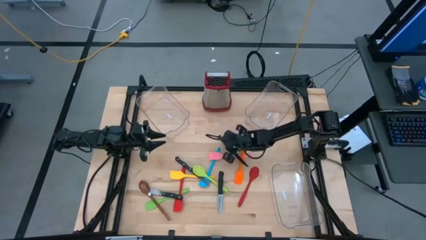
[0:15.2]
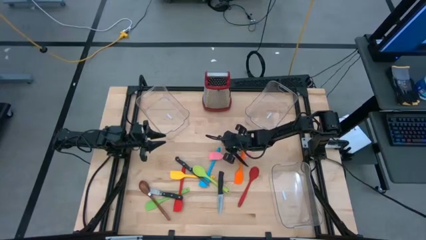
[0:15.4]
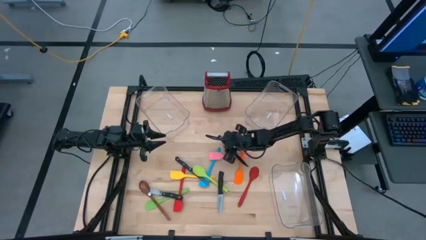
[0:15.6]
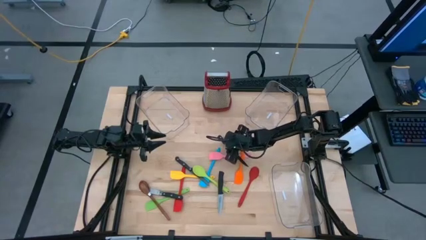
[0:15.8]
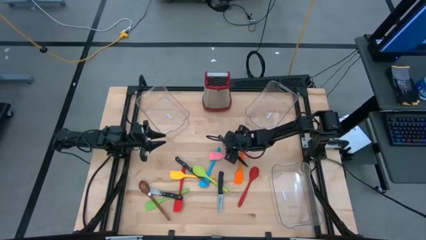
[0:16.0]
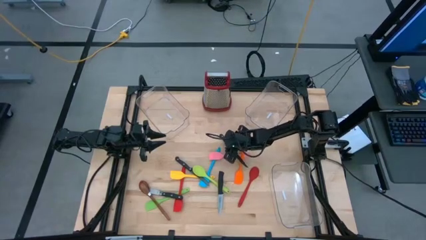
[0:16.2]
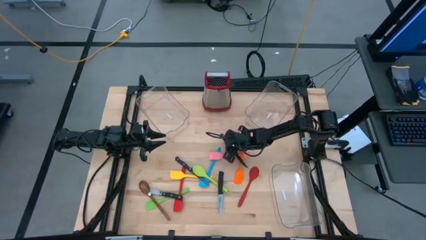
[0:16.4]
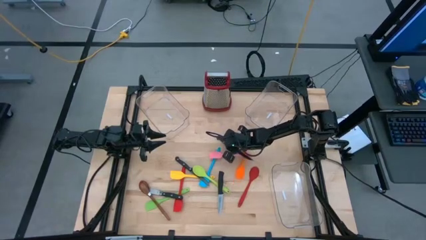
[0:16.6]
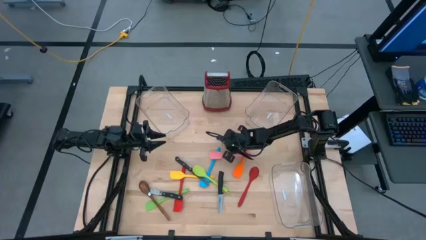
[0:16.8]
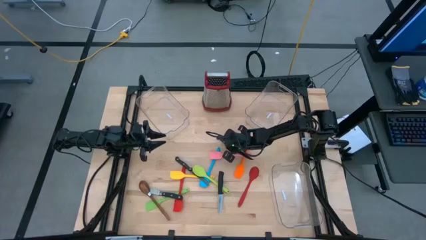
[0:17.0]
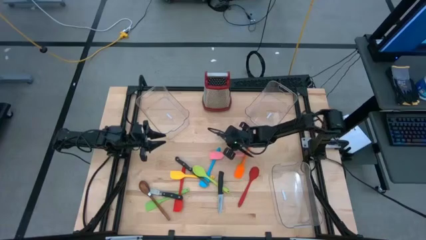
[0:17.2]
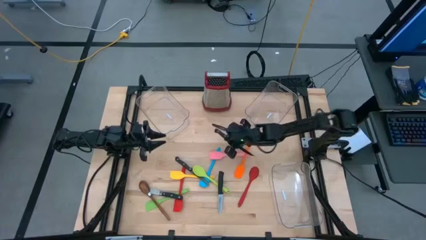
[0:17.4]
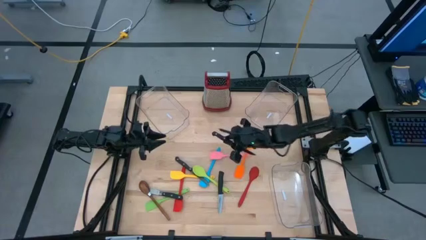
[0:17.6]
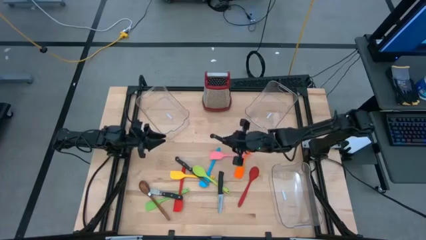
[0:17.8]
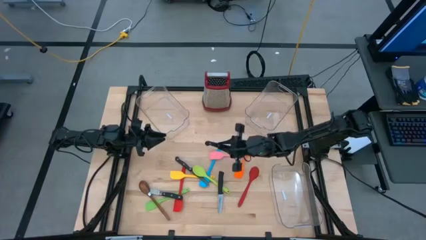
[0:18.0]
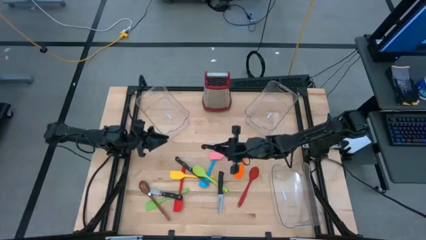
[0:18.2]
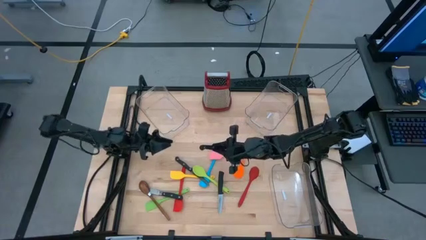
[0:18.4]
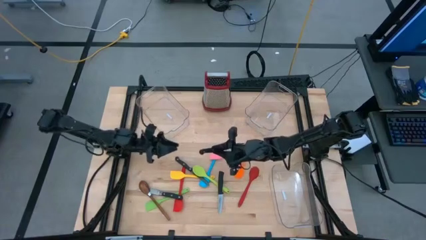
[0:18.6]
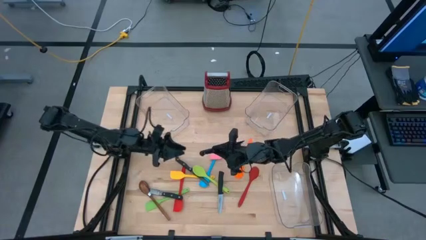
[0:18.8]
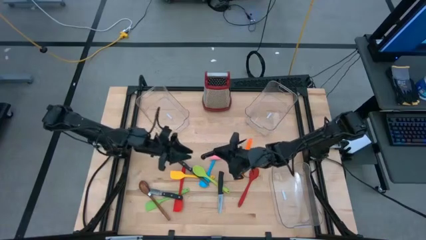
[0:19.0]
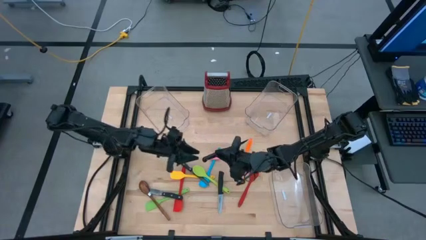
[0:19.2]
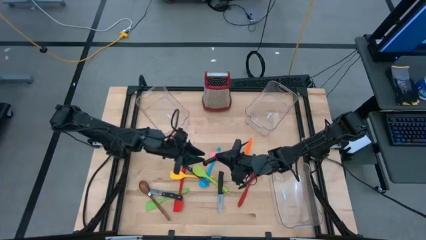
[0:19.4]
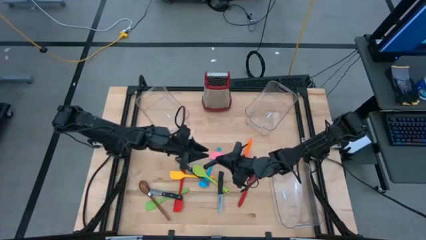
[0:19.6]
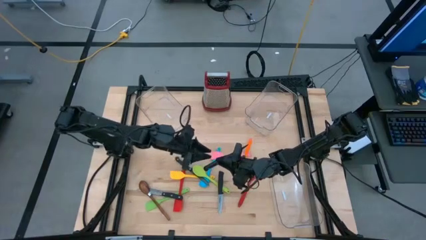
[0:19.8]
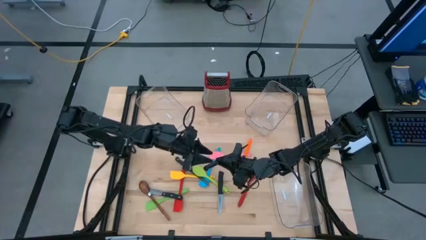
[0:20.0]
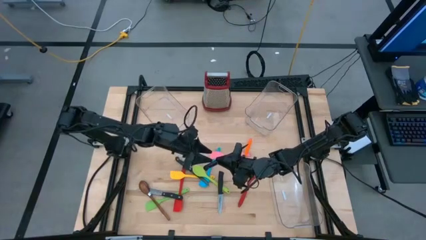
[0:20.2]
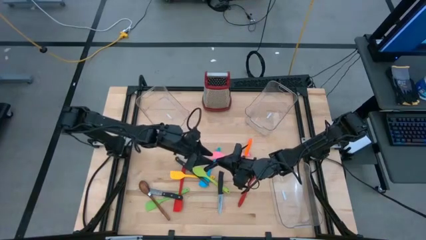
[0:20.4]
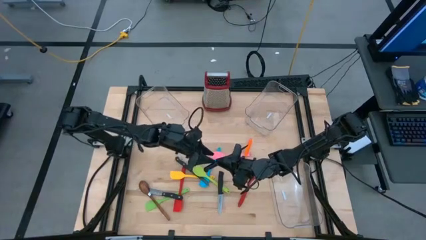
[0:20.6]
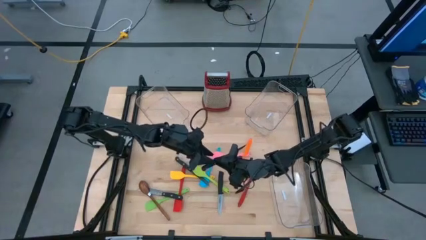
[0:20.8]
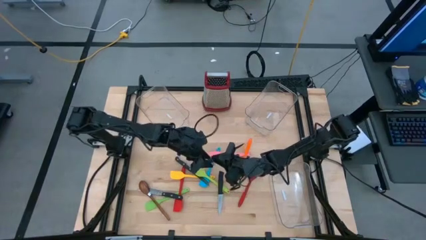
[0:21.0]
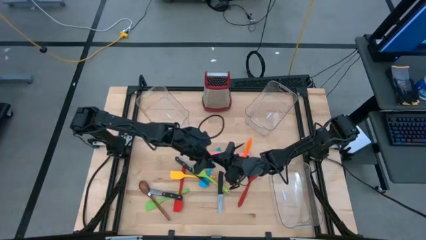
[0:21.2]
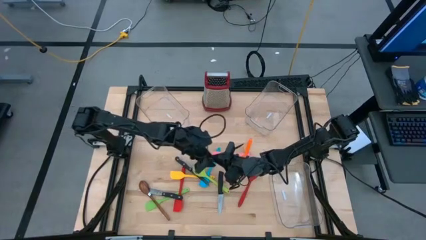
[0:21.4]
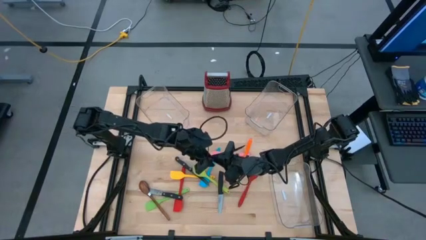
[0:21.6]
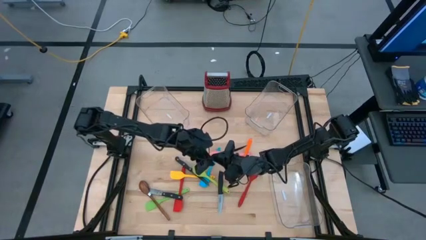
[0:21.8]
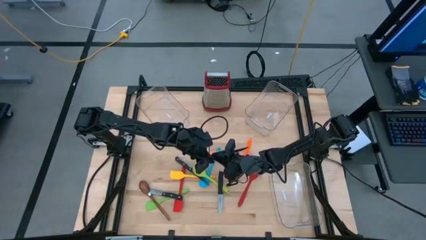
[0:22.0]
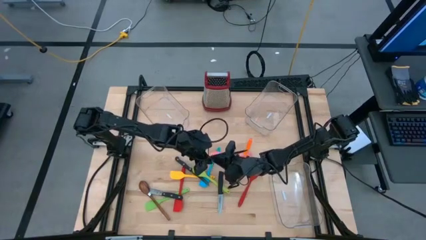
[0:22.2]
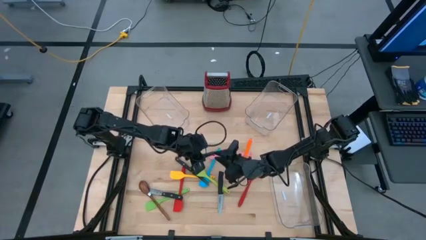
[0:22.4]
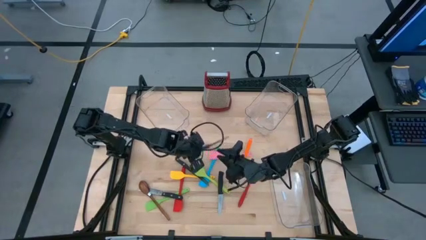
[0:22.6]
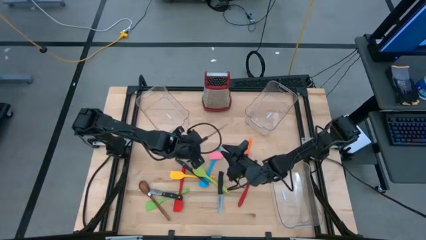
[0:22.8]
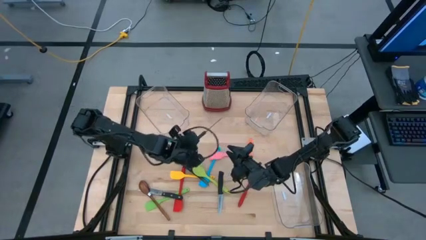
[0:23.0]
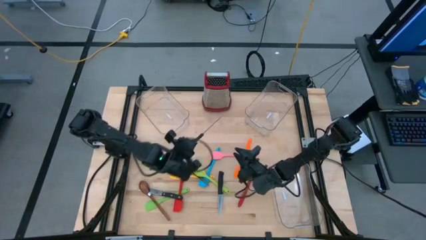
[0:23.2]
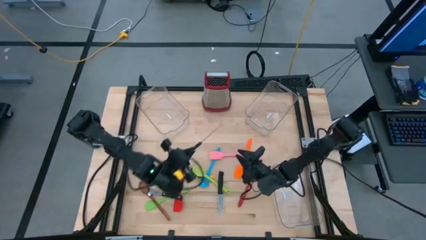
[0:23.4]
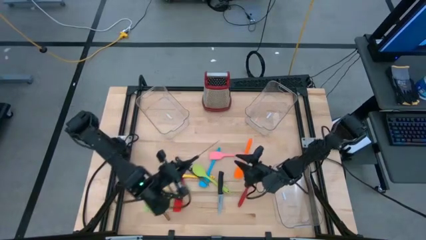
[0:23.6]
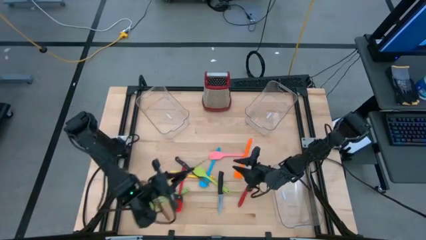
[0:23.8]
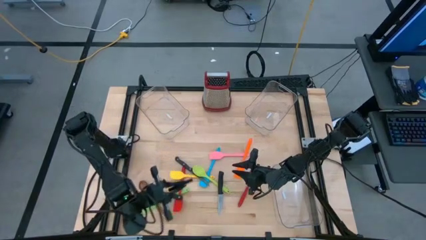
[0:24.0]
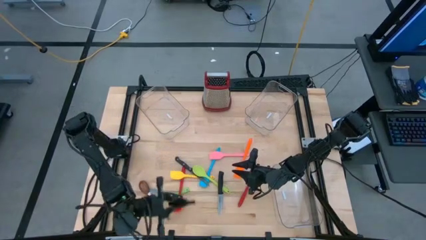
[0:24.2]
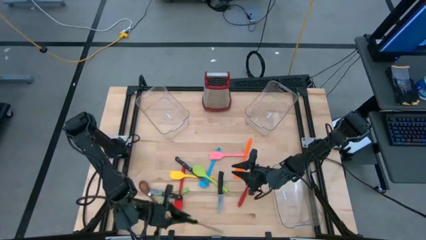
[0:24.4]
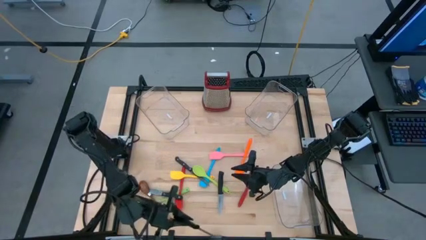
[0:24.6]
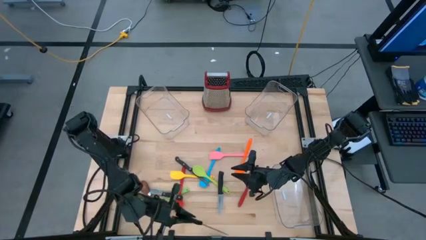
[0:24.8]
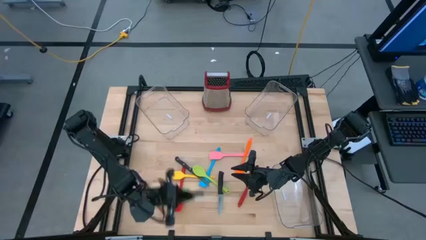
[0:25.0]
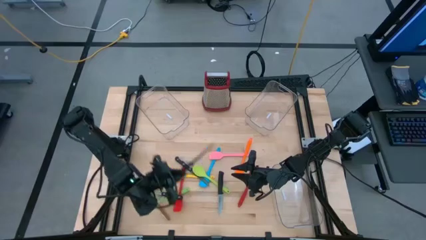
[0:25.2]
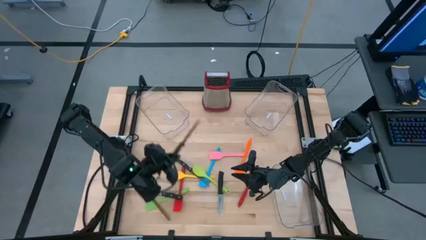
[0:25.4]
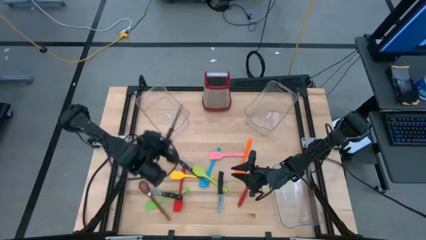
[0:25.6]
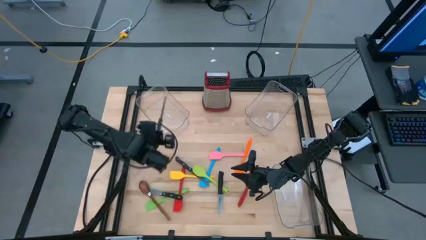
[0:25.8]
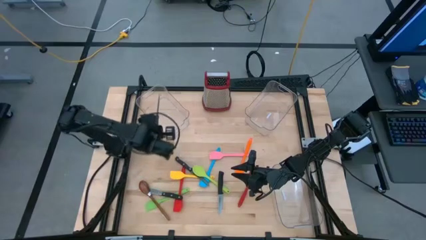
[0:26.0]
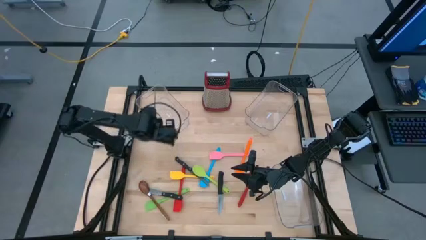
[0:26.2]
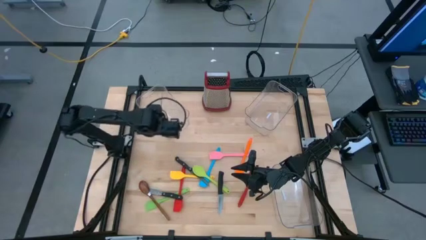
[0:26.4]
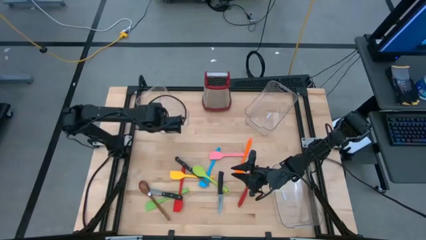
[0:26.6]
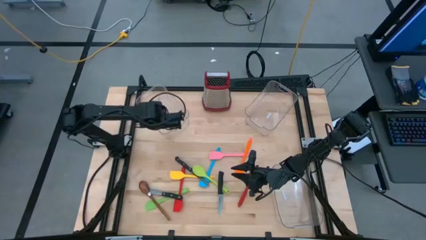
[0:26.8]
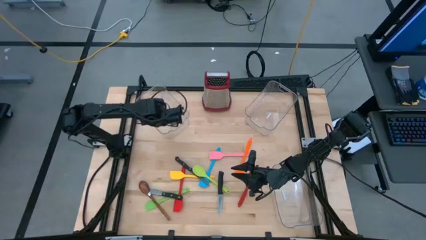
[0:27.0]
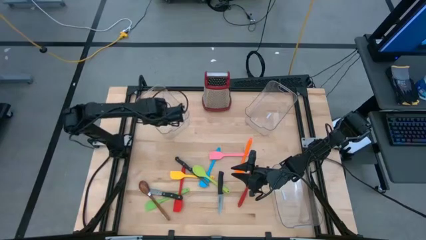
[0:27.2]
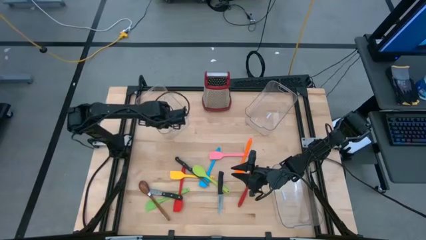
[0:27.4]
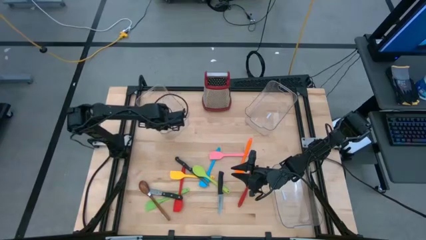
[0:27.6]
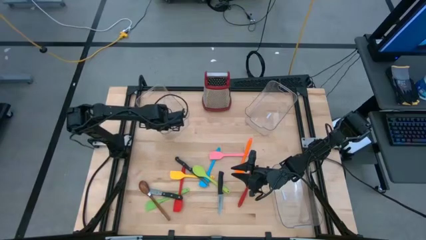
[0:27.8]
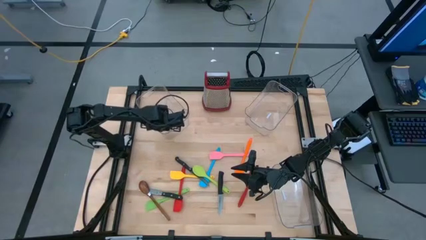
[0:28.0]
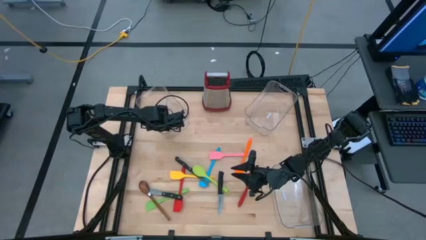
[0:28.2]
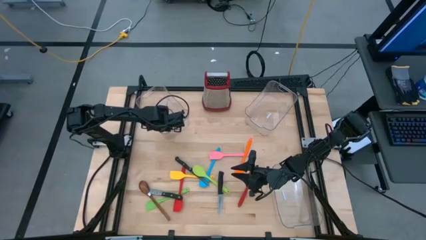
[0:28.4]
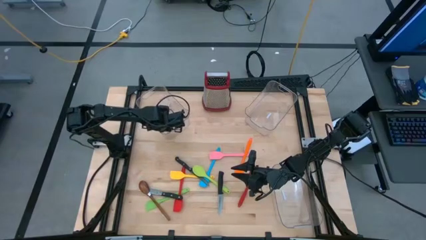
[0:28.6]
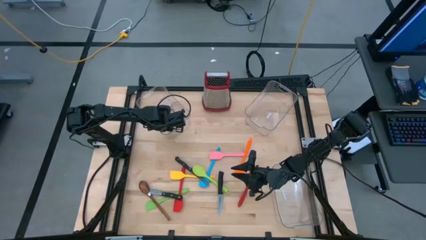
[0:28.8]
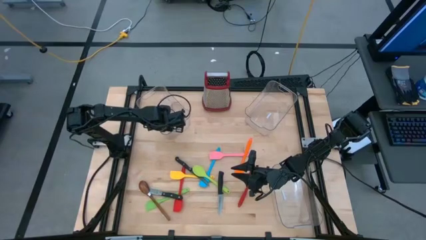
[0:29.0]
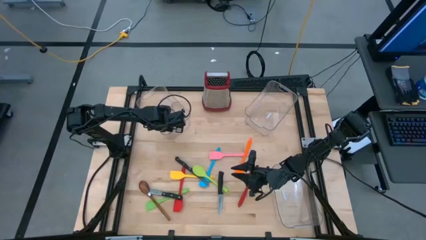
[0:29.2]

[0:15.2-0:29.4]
Task: Pick & Place Kitchen Items
Put the right black knife into the top left transparent bin
